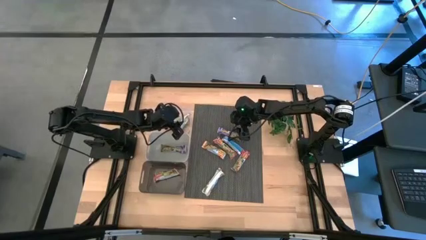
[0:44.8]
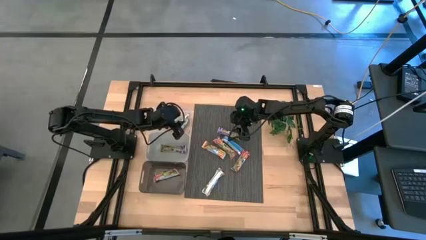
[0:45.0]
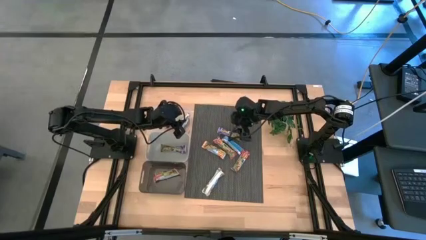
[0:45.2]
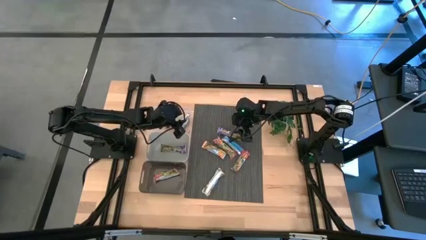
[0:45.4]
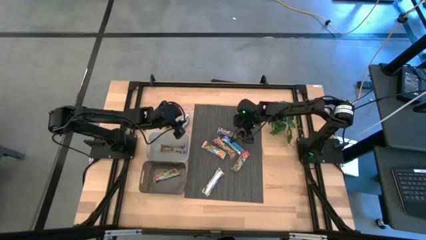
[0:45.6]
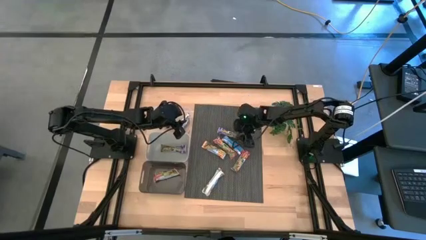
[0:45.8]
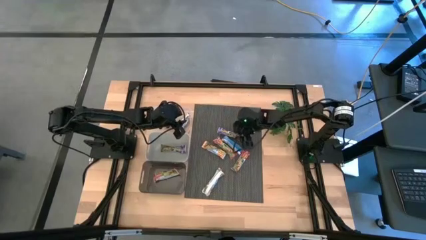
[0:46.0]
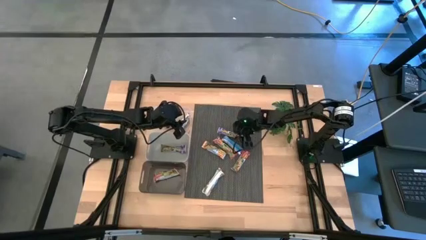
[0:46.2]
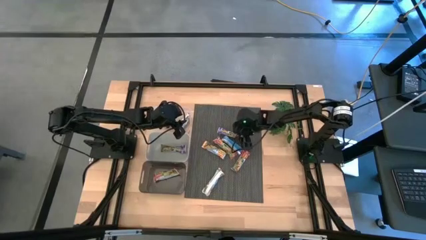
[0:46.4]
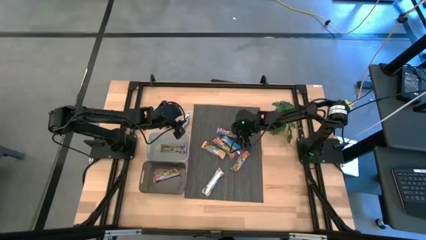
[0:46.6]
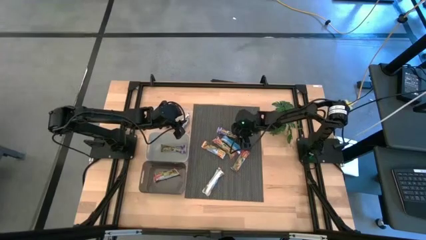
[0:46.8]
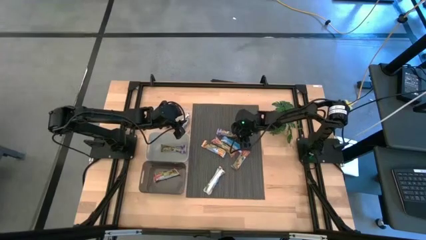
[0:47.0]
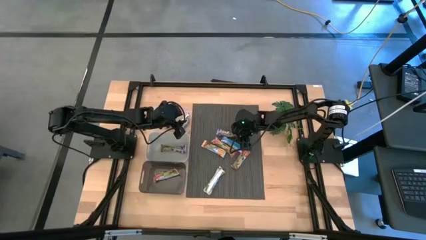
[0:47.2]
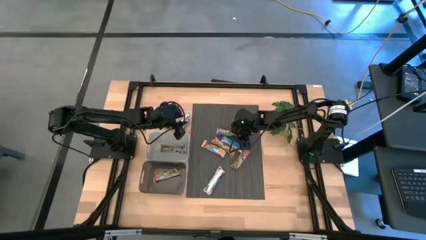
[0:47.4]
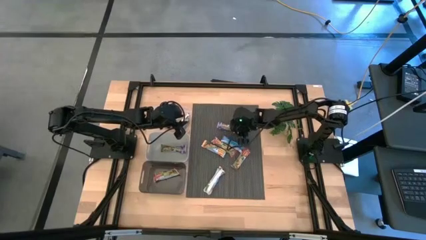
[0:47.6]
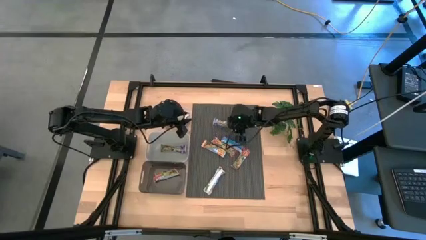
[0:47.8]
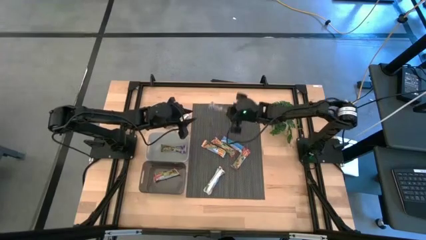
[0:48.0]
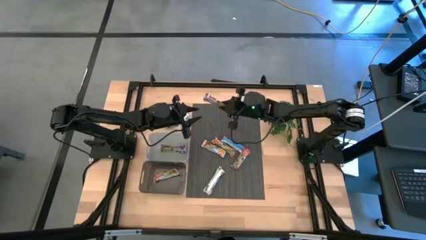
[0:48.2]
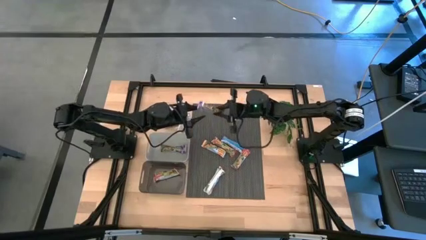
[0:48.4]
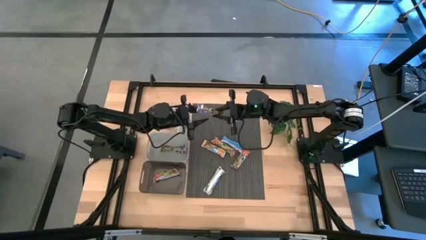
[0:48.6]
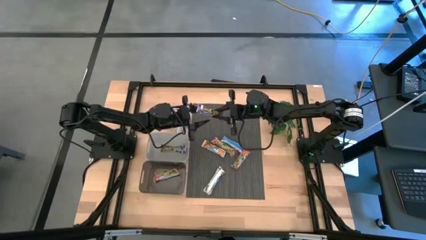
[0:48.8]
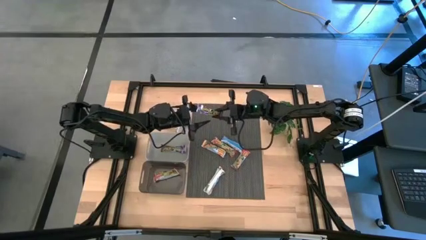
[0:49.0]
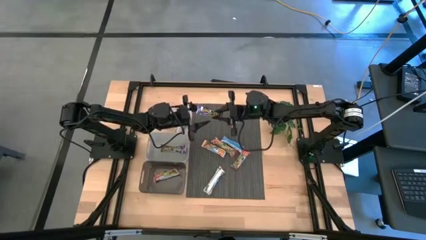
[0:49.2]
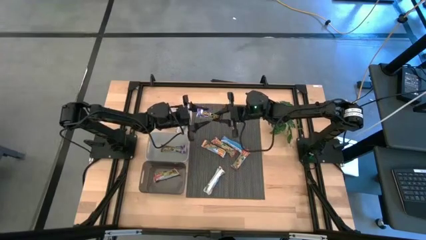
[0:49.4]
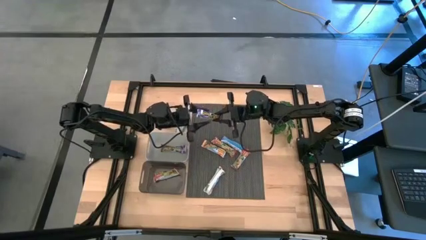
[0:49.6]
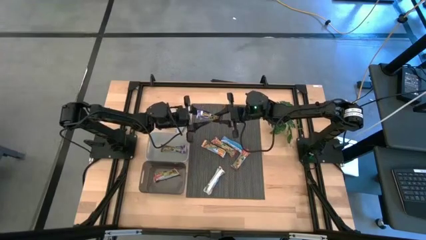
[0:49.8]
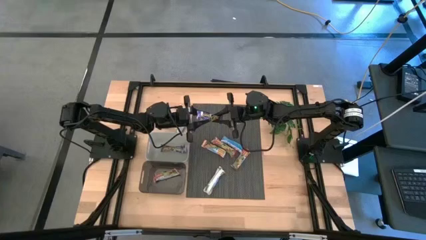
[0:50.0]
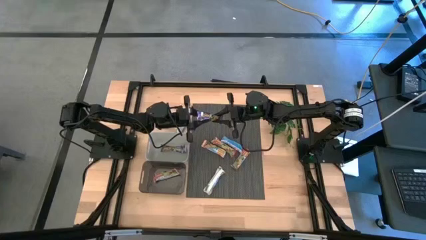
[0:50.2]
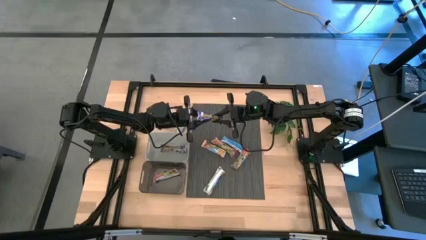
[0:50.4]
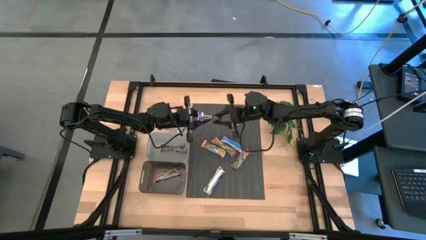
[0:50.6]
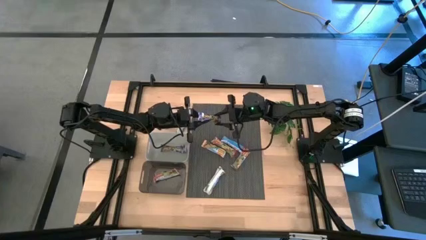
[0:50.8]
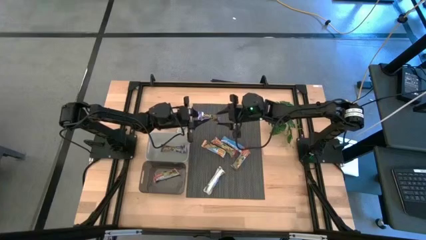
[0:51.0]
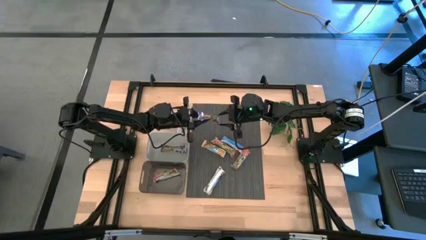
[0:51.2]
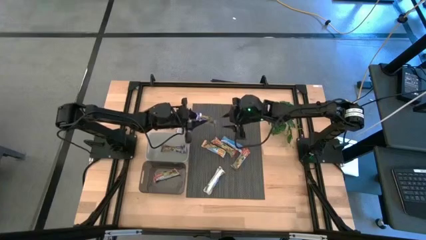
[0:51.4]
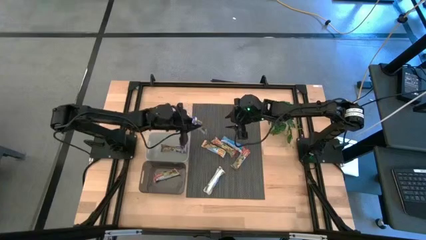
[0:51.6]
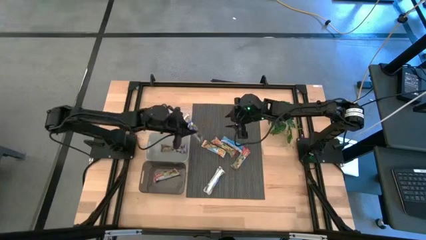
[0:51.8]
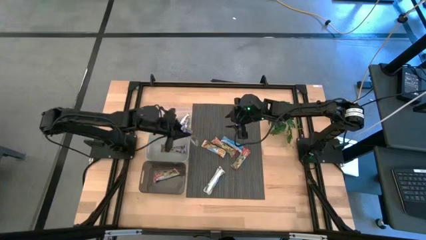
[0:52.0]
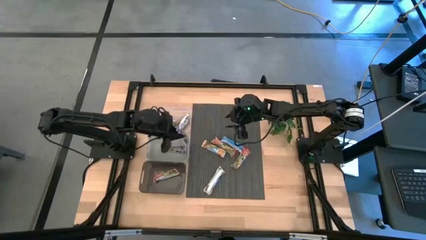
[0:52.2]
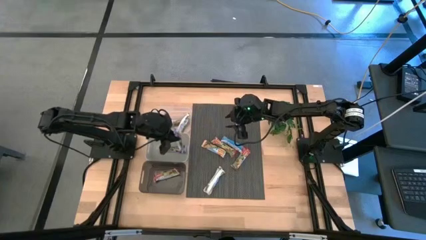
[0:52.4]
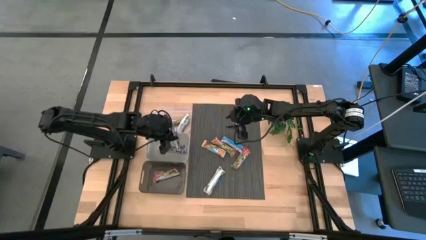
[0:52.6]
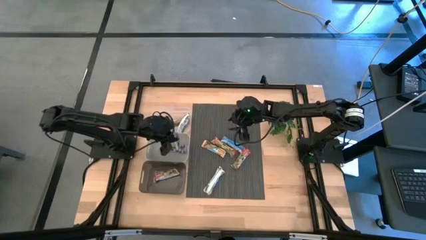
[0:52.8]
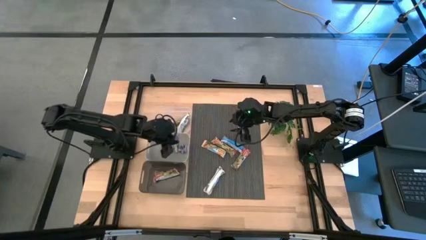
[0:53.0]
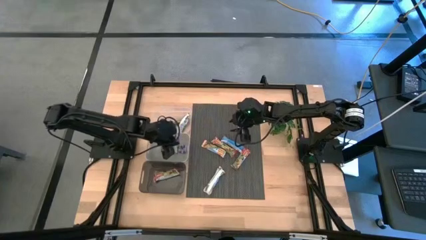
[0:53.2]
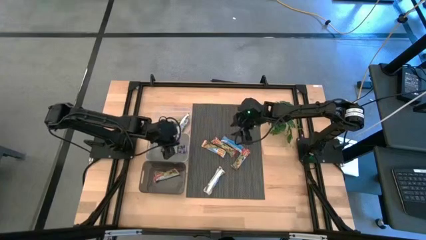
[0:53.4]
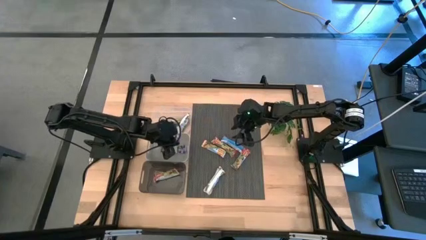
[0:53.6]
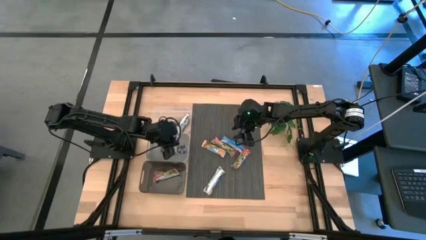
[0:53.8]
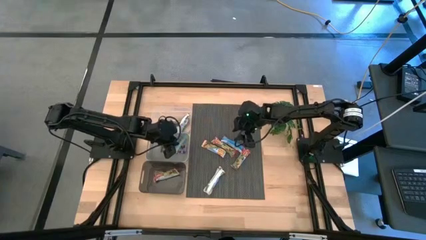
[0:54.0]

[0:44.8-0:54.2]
Task: Pick and place Granola Bars by type
Put the blue granola bar into the gray bin

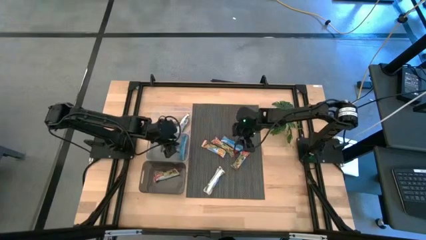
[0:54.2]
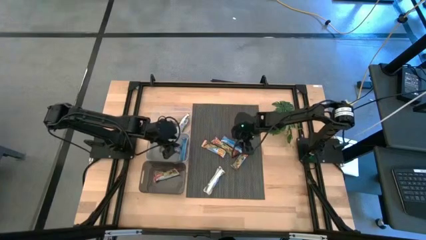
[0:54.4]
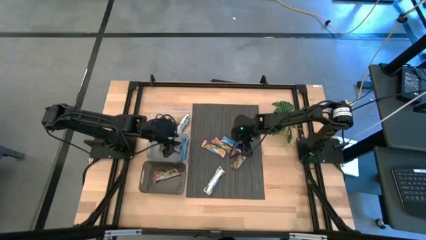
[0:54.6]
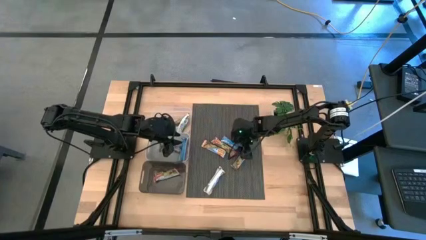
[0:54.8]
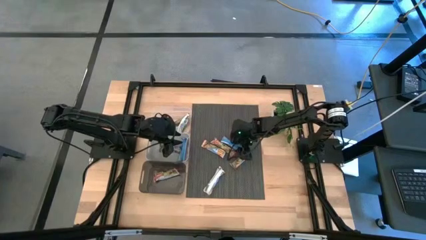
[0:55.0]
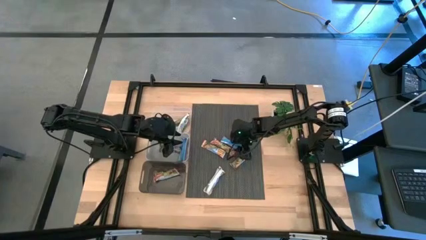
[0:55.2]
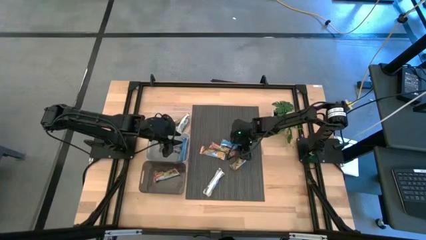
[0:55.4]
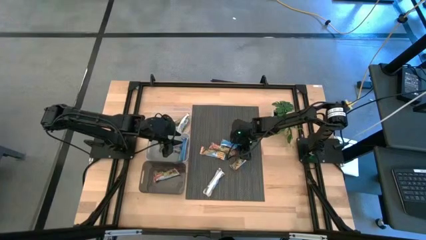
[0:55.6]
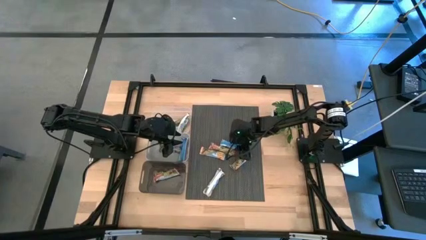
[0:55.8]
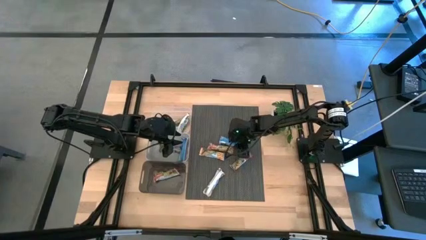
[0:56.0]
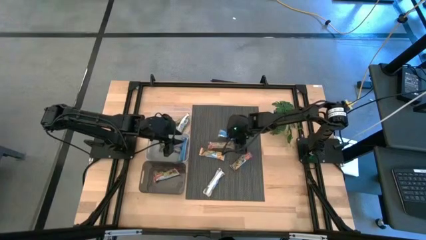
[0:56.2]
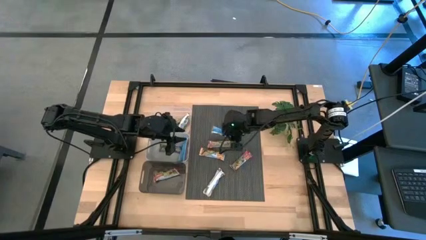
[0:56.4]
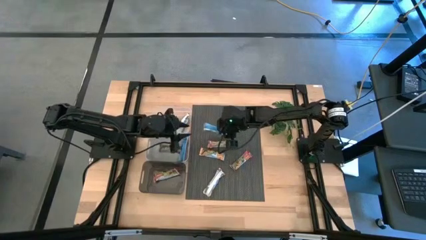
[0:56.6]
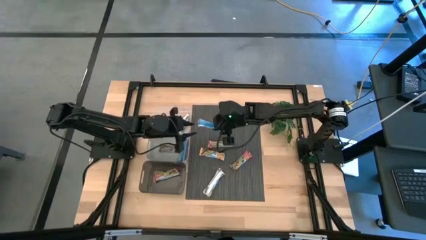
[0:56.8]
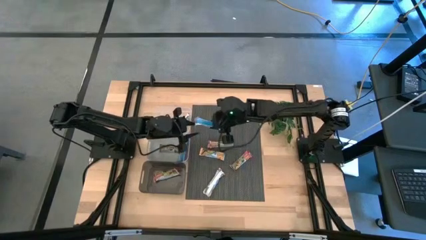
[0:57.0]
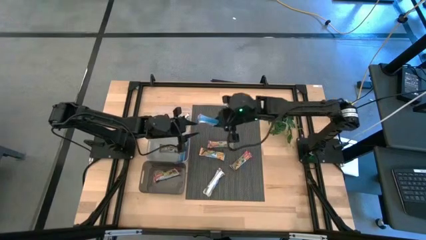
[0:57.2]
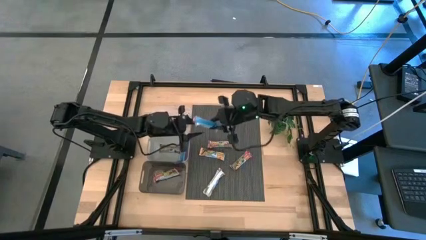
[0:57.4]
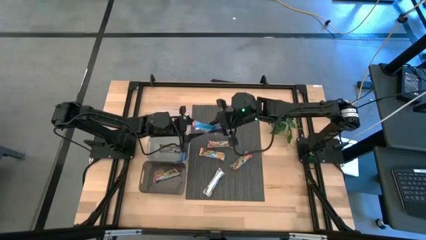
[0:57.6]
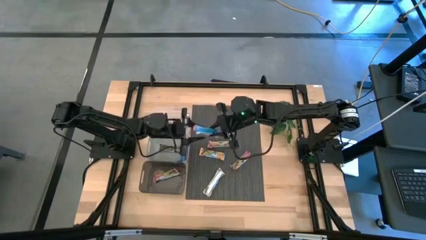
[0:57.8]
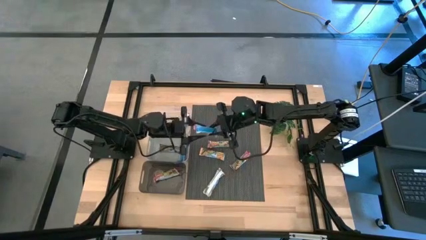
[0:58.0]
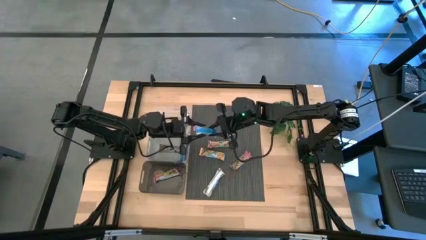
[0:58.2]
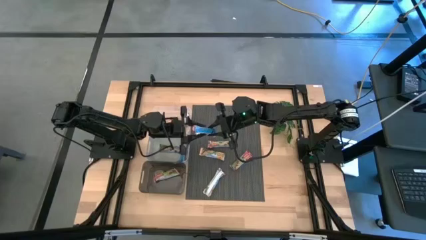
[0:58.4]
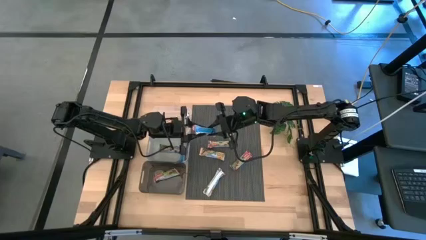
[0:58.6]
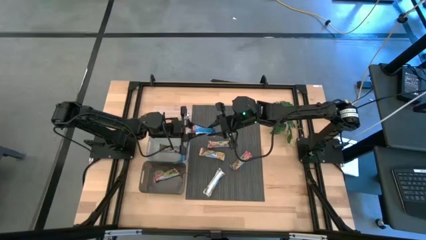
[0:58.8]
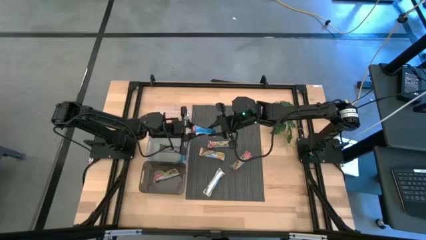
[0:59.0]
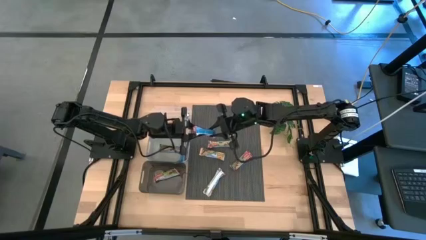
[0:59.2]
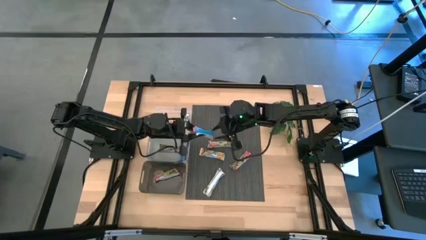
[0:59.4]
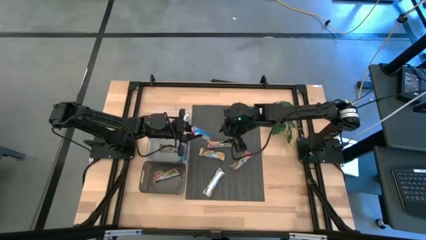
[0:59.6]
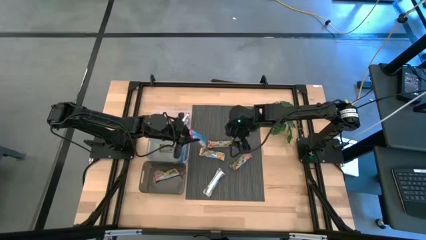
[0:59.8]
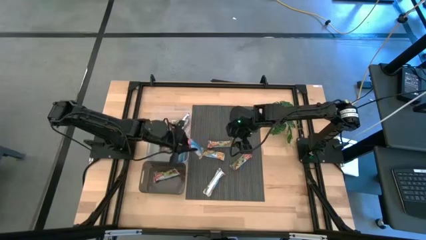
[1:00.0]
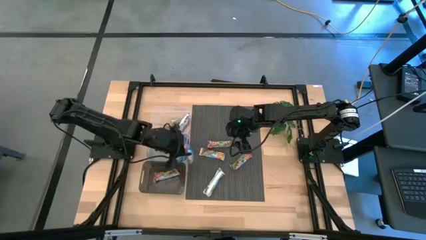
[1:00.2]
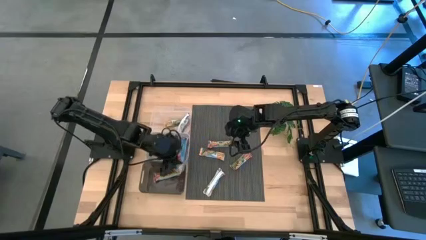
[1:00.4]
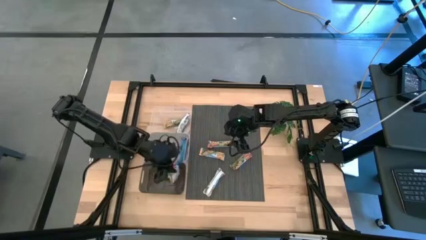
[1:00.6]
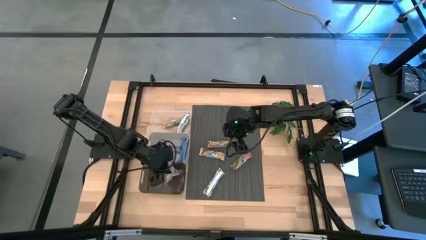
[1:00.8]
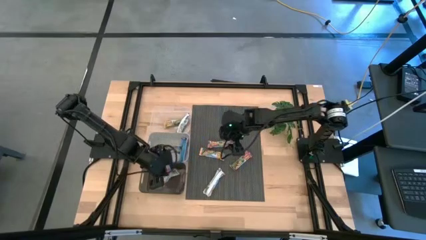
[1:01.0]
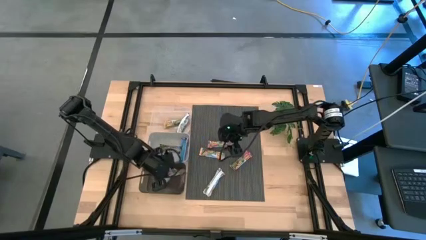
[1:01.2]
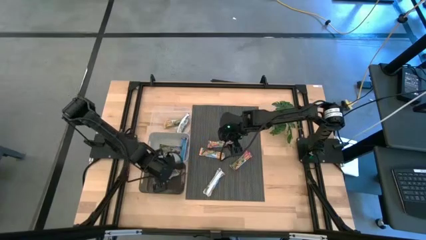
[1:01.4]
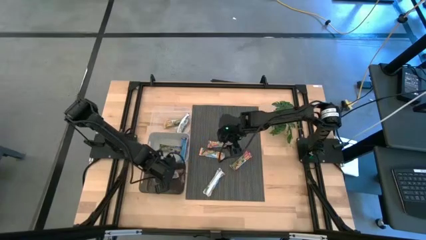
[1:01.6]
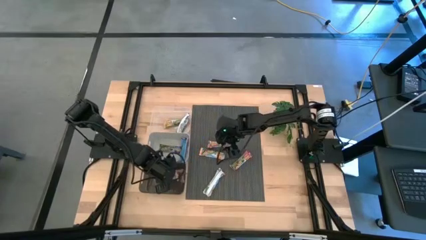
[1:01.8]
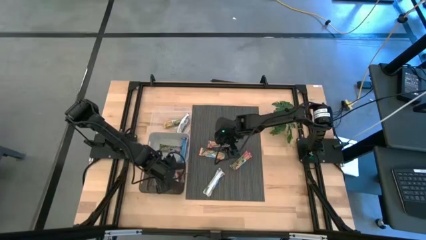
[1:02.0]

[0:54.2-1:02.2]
Put the red granola bar into the black bin
